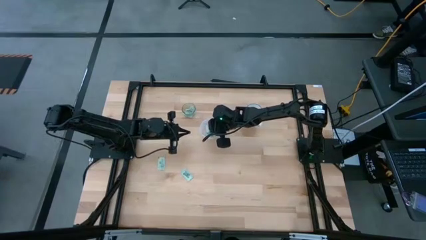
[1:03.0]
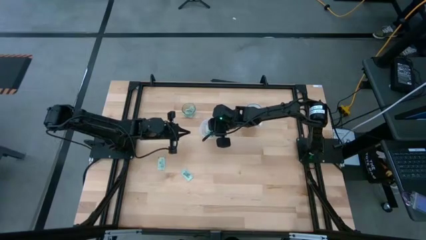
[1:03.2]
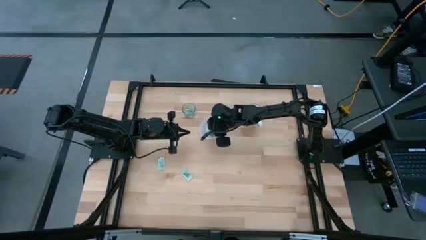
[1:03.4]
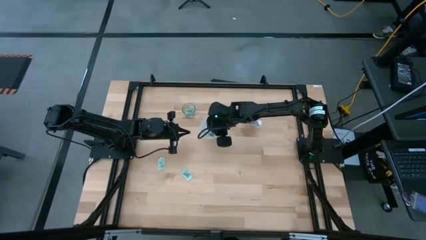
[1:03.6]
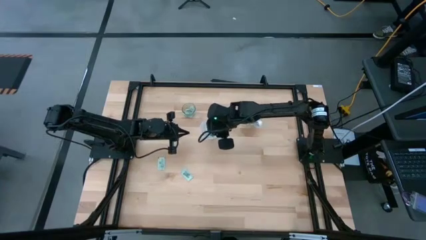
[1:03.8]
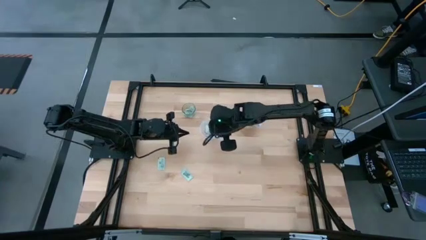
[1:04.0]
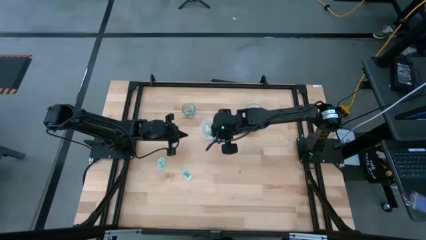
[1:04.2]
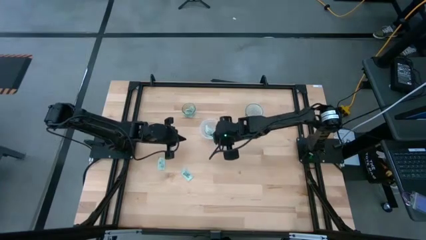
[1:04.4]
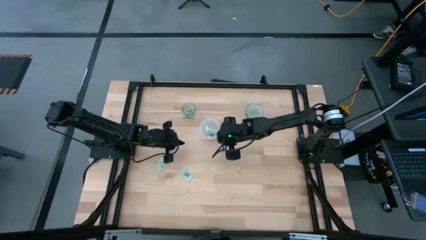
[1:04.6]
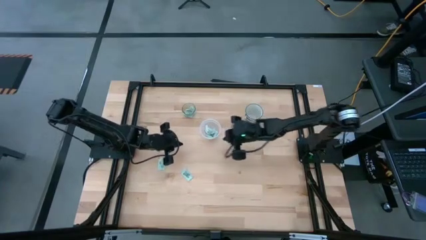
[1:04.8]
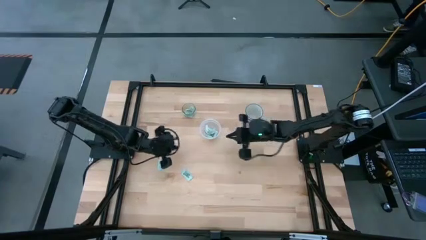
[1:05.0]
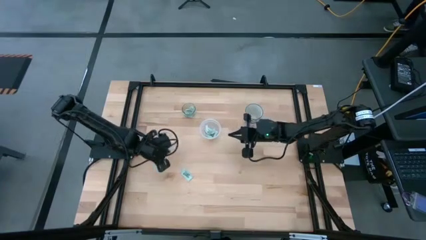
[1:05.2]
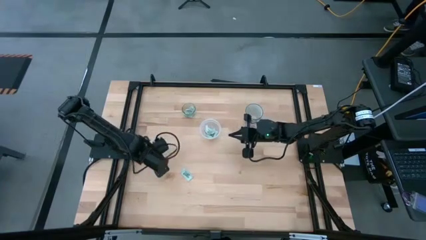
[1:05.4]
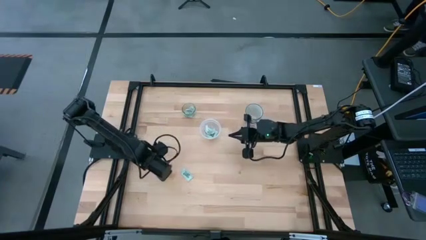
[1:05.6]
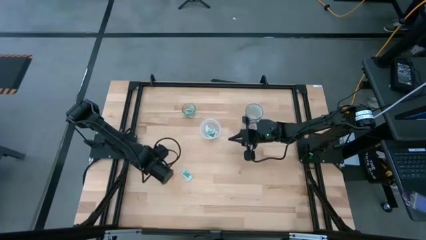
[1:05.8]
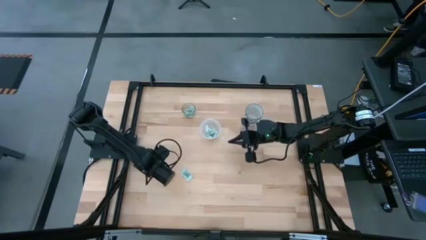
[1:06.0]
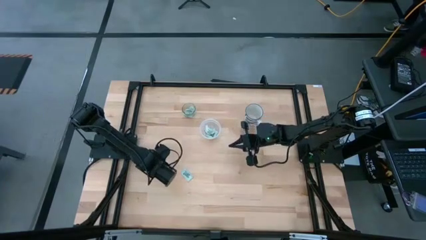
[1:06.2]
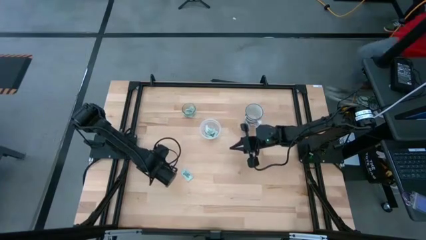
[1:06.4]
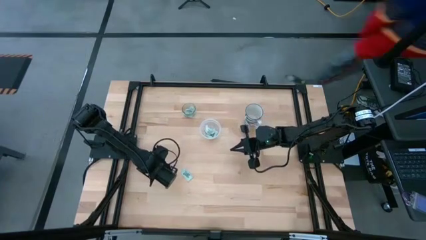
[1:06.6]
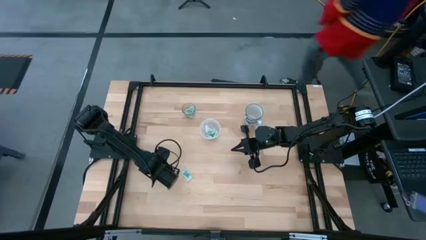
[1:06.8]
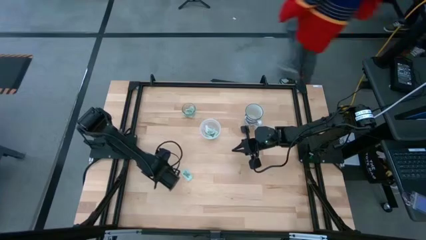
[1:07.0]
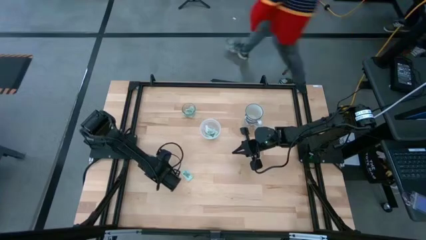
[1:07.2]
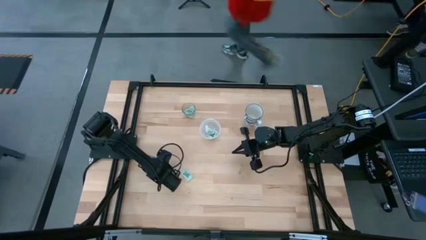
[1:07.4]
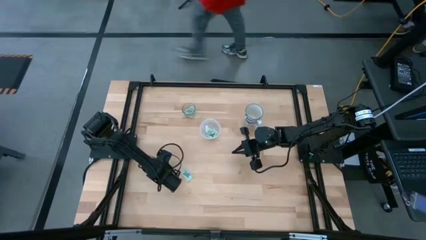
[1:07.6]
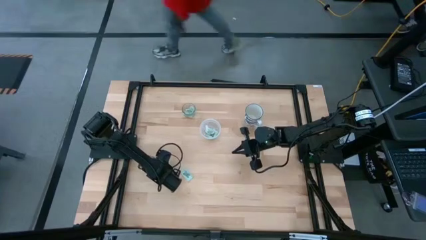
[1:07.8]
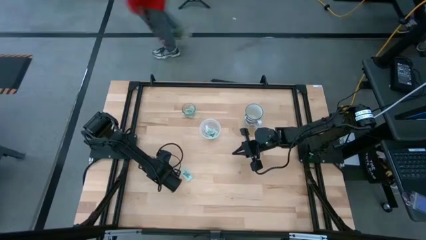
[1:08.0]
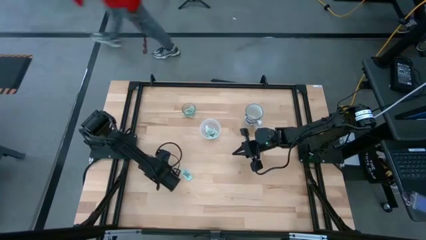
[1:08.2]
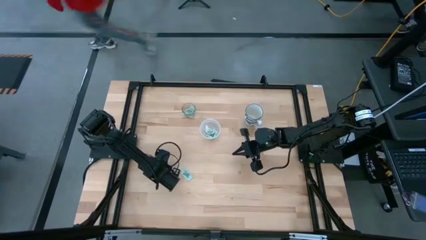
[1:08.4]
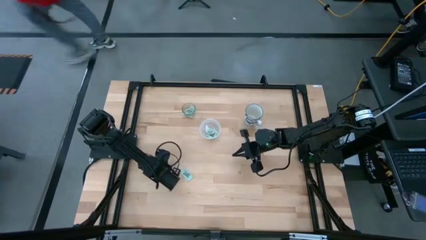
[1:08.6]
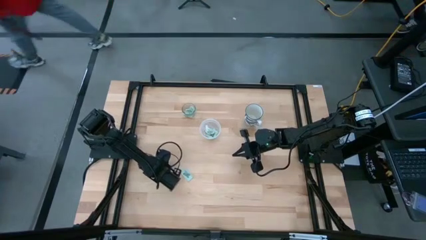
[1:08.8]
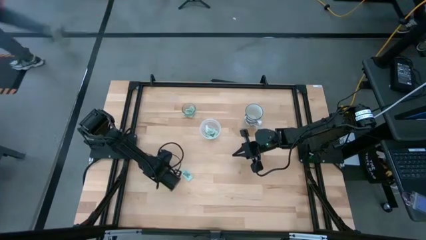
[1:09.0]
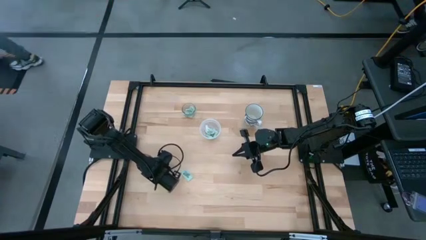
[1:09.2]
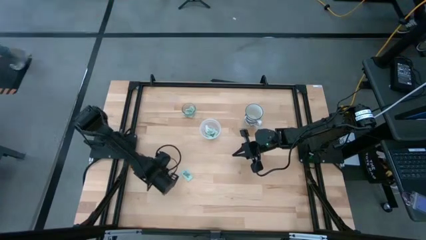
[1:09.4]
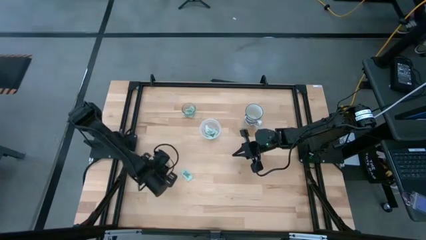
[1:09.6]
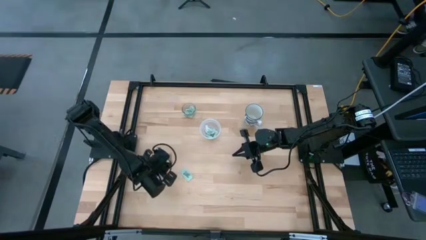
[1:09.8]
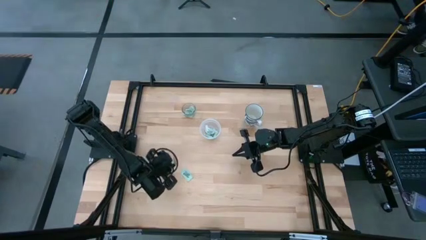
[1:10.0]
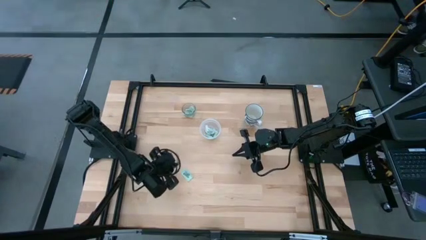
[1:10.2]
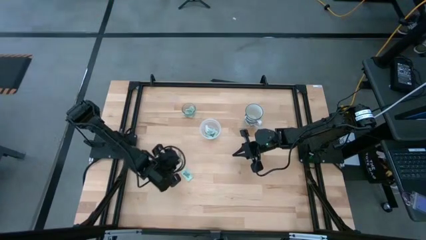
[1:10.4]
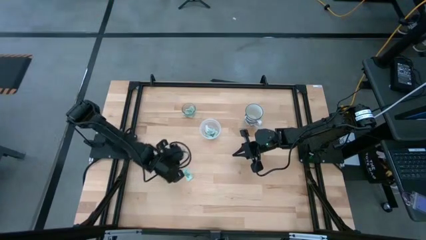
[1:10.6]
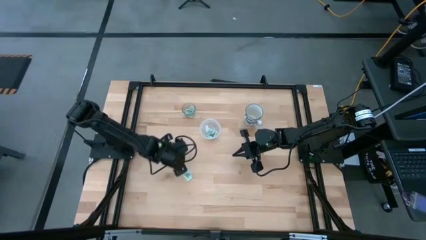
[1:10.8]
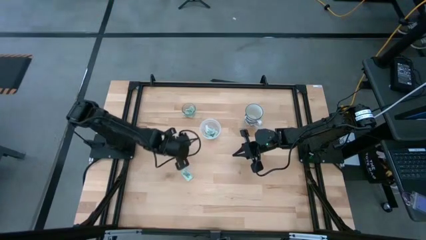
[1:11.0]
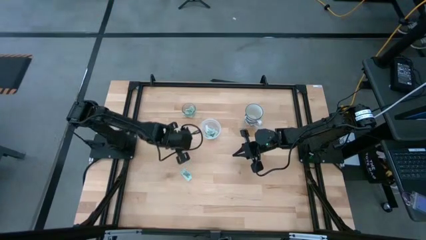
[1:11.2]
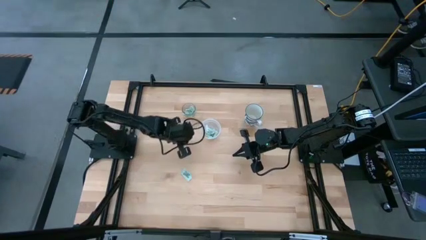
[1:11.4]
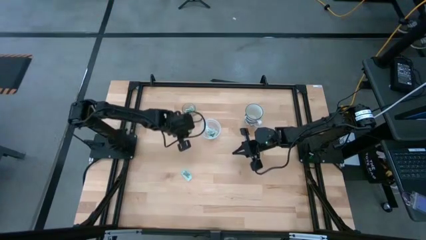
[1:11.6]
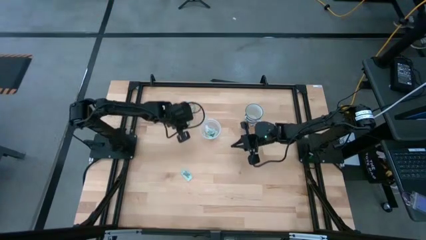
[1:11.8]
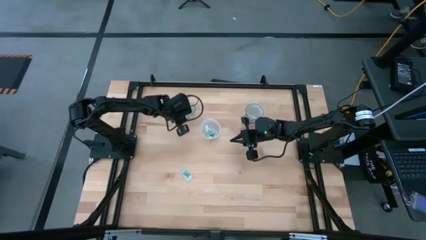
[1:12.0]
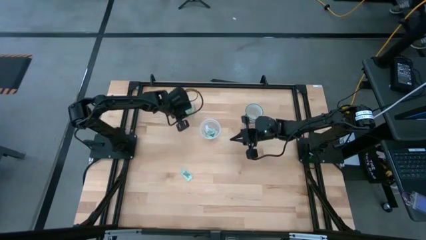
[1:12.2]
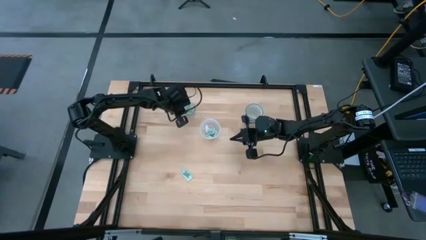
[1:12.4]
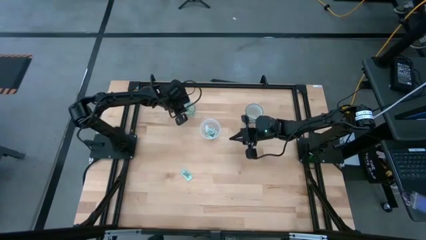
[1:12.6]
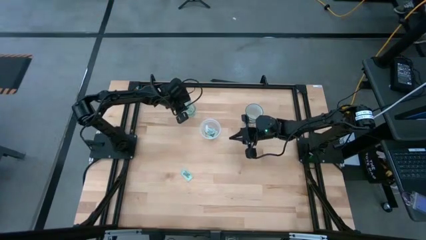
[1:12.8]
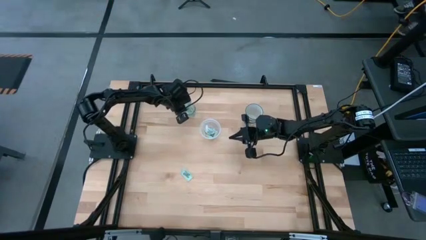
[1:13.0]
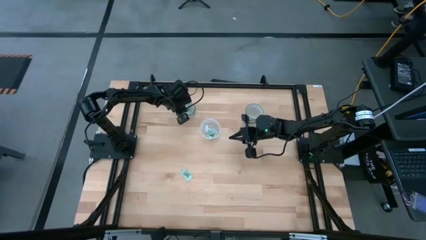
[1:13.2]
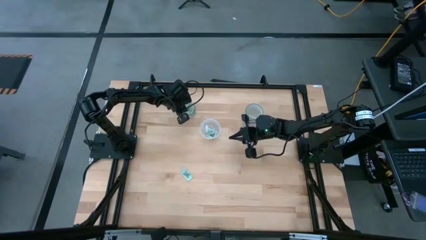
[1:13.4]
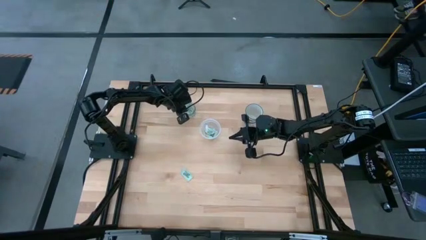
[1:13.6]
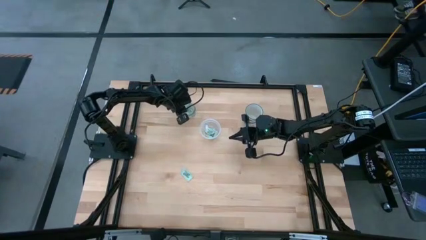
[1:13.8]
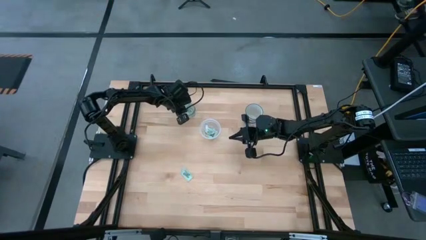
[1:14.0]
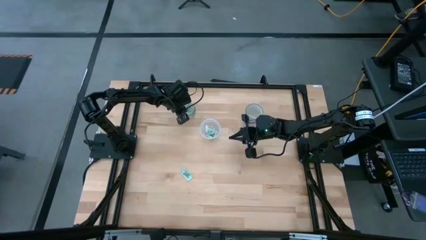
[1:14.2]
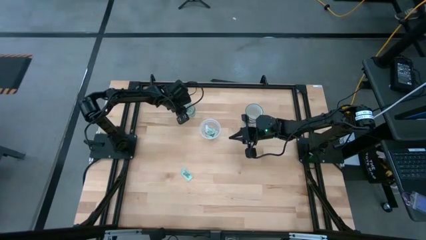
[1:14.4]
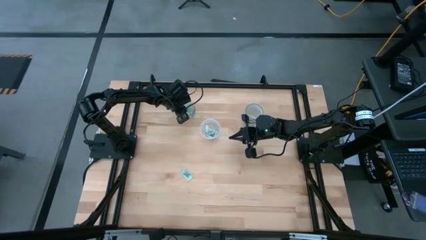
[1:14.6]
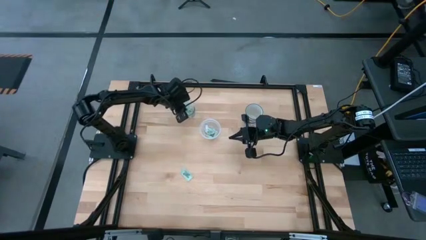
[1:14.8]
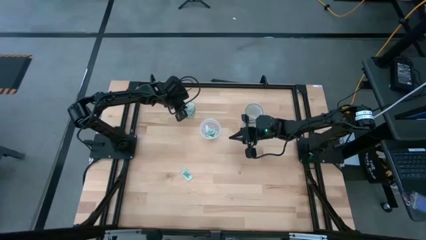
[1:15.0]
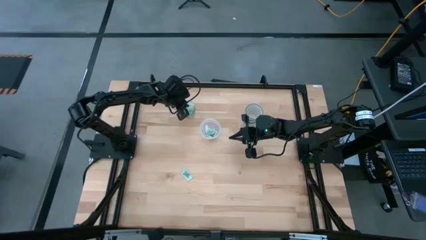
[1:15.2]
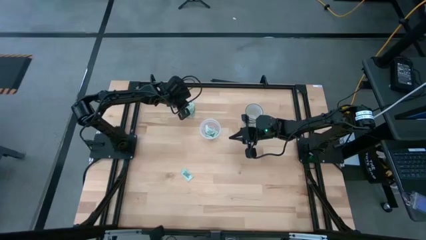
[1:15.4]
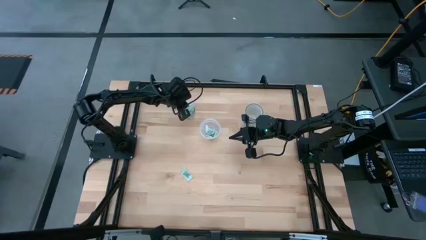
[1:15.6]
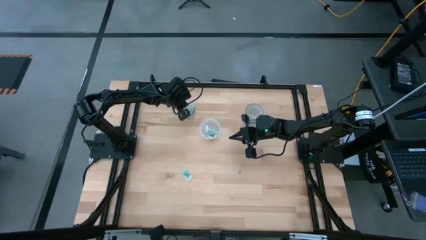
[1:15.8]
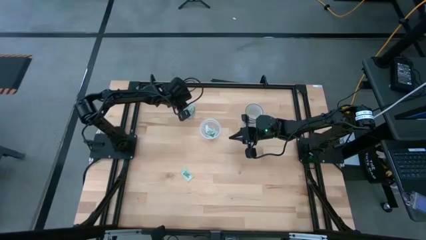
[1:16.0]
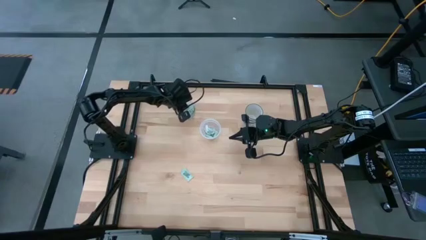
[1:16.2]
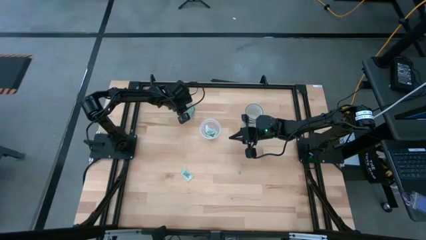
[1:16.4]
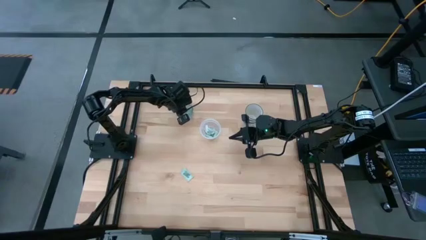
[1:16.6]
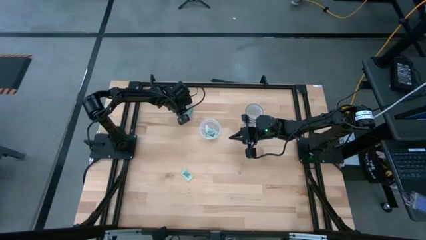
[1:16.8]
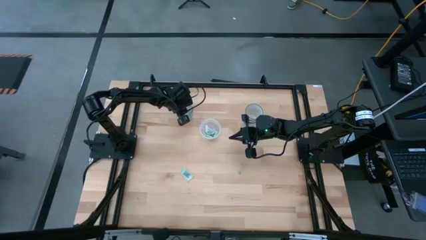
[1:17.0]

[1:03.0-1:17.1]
Task: Pick and place Stevia / Truvia into bins
Put the stevia packet into the glass container

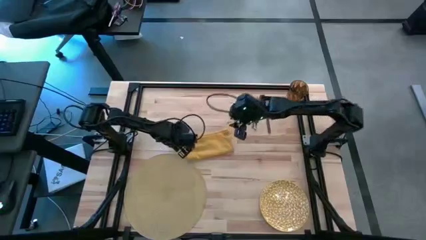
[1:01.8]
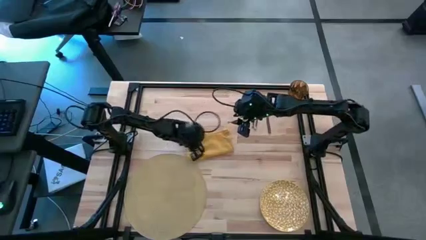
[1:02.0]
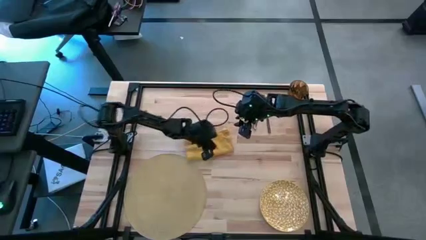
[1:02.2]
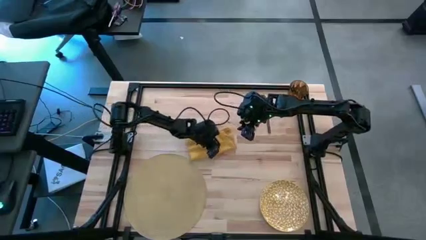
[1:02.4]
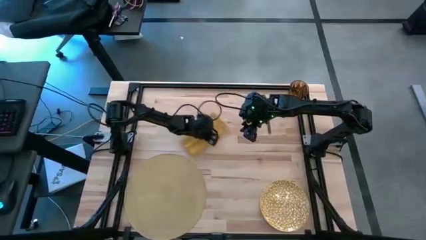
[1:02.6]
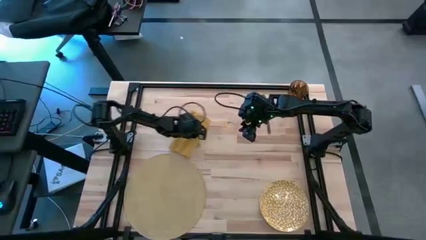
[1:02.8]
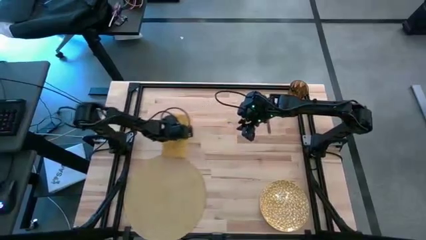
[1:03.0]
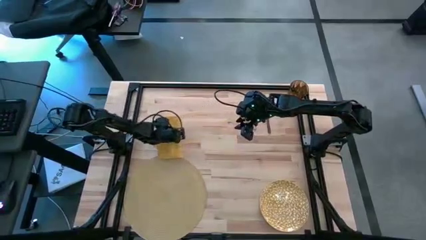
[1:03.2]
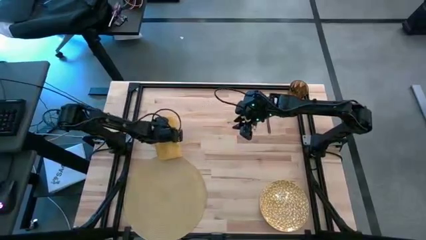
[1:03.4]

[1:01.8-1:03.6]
Task: Set table place
Move the yellow napkin to the middle left of the table
